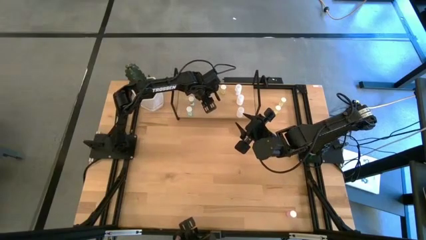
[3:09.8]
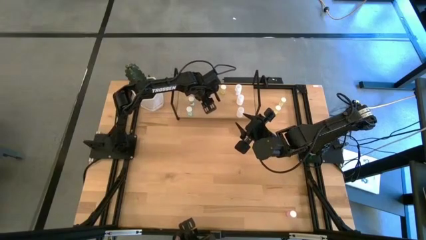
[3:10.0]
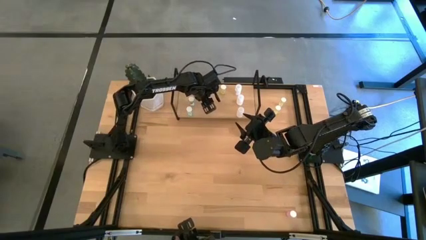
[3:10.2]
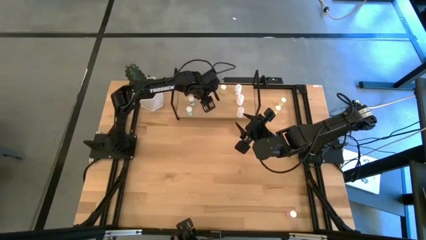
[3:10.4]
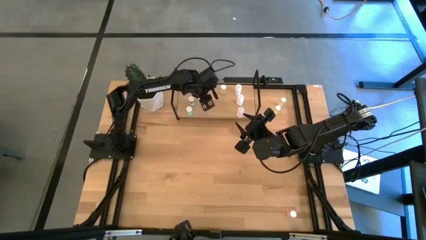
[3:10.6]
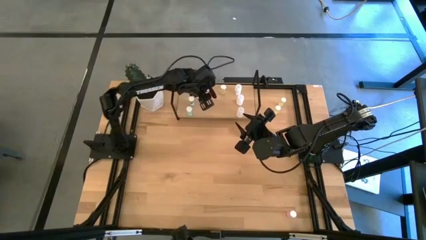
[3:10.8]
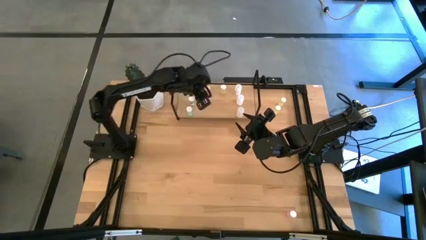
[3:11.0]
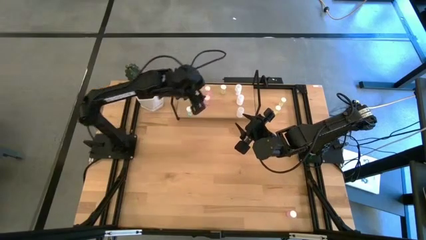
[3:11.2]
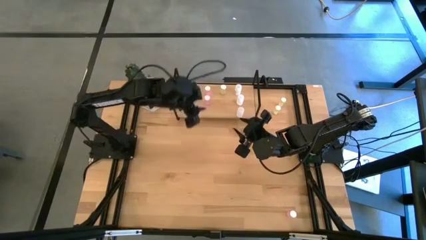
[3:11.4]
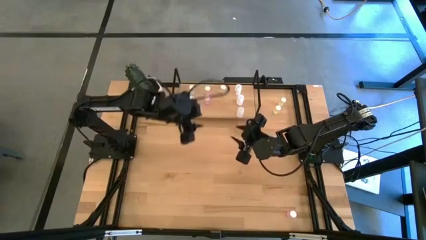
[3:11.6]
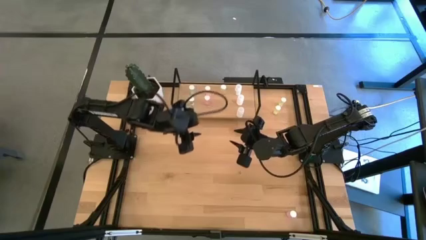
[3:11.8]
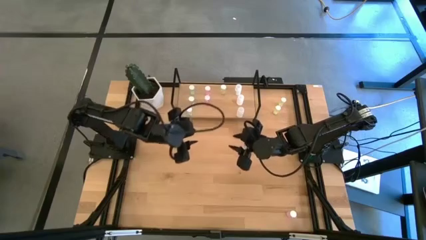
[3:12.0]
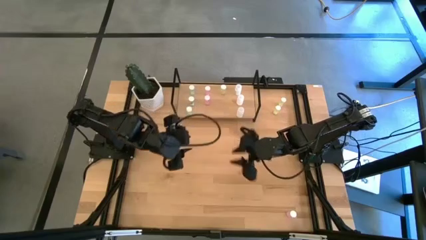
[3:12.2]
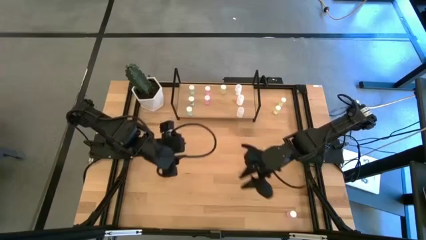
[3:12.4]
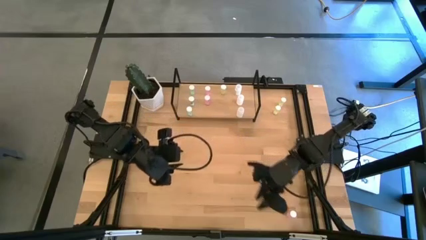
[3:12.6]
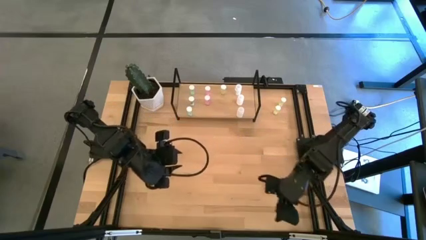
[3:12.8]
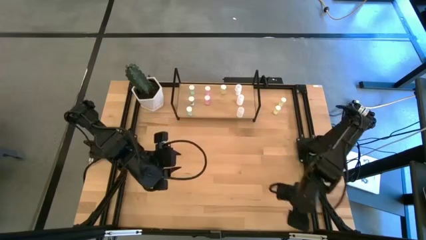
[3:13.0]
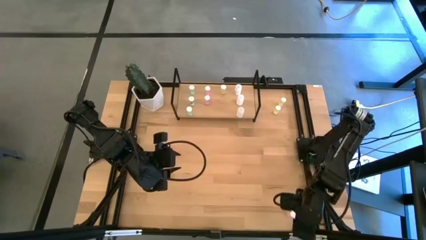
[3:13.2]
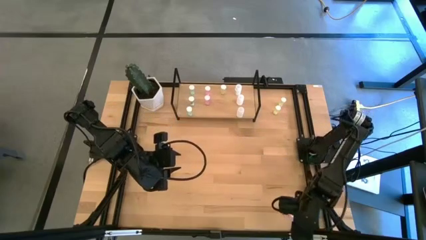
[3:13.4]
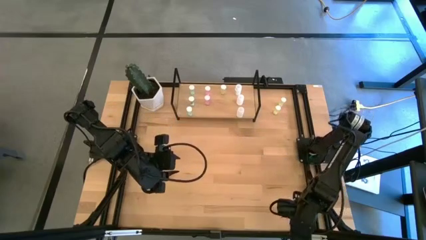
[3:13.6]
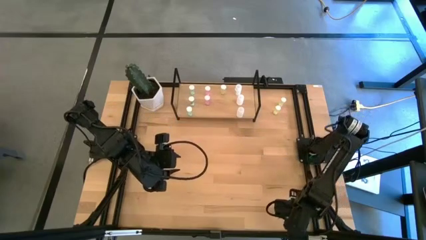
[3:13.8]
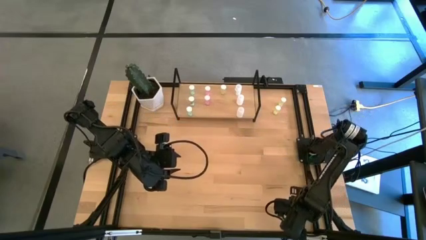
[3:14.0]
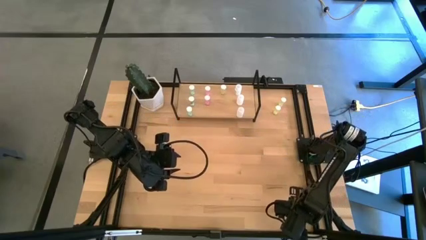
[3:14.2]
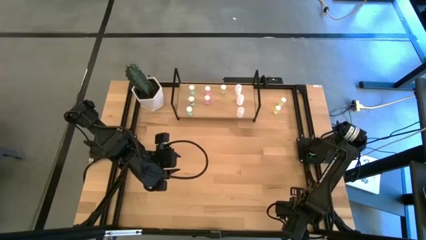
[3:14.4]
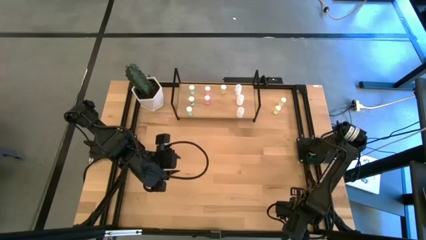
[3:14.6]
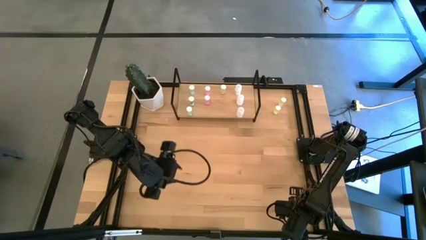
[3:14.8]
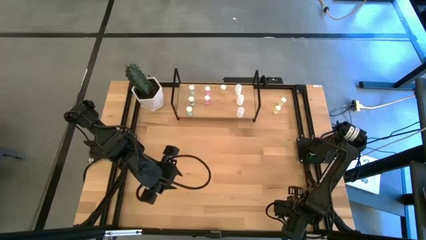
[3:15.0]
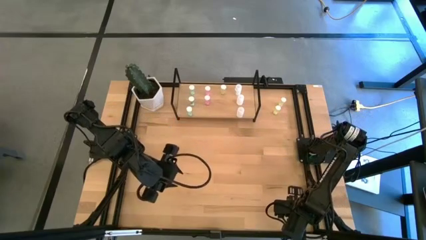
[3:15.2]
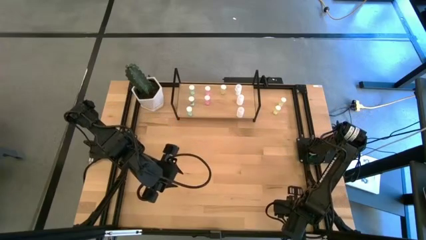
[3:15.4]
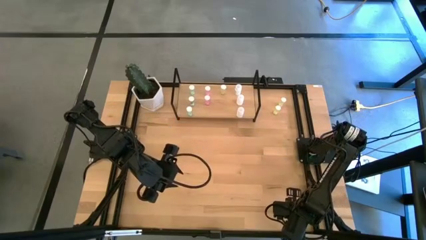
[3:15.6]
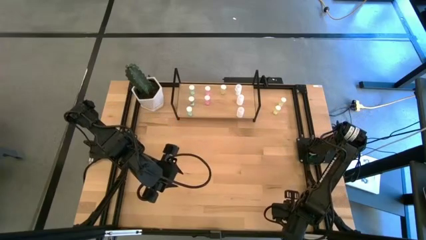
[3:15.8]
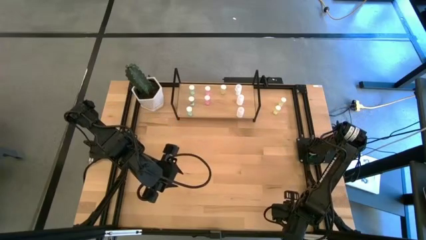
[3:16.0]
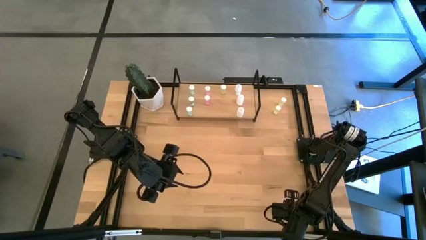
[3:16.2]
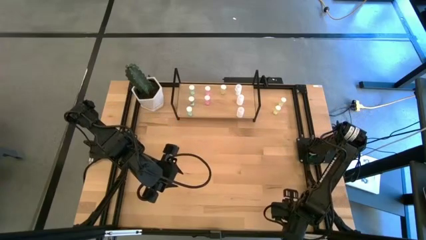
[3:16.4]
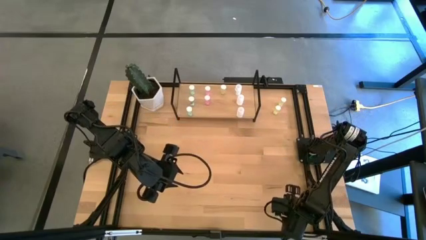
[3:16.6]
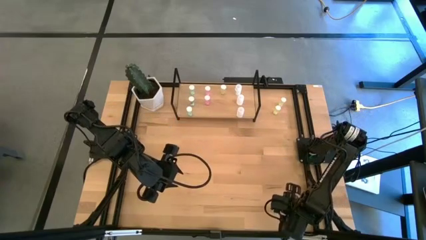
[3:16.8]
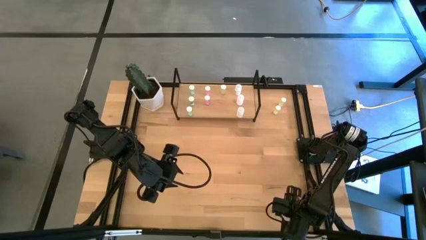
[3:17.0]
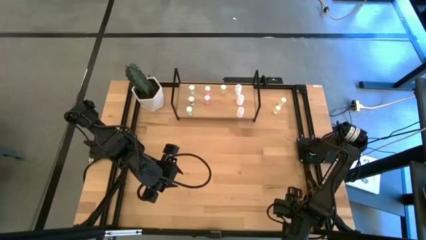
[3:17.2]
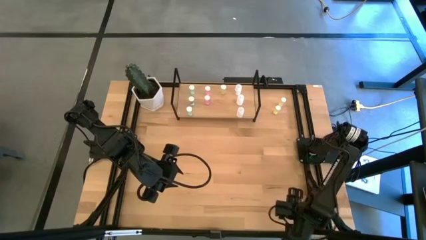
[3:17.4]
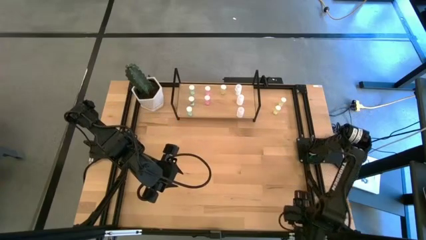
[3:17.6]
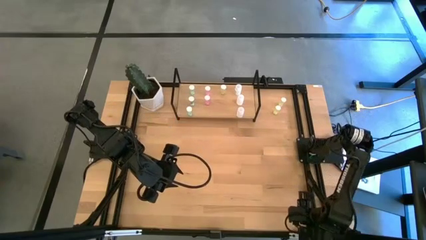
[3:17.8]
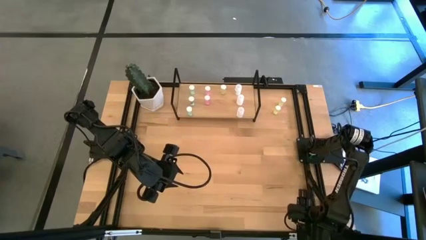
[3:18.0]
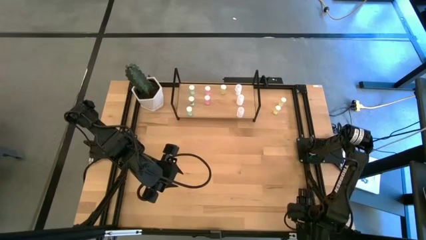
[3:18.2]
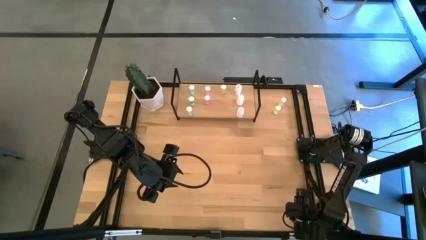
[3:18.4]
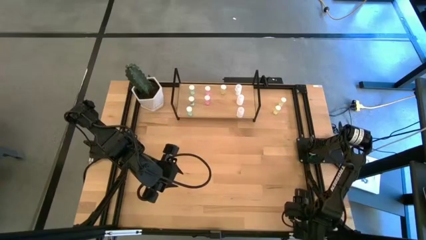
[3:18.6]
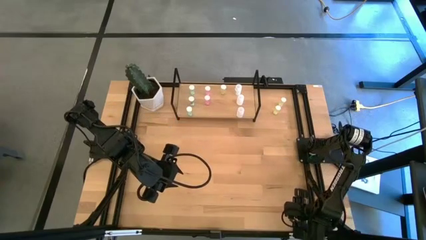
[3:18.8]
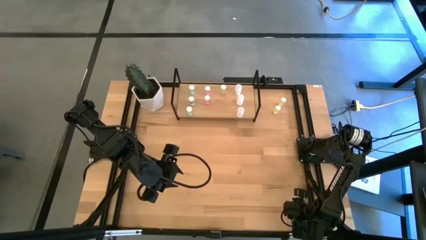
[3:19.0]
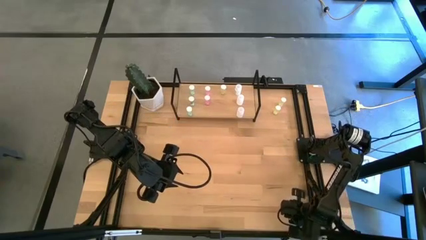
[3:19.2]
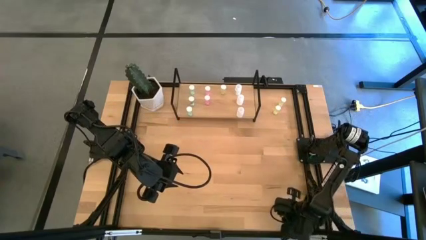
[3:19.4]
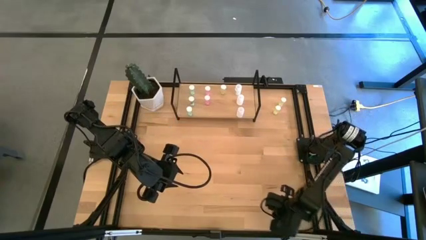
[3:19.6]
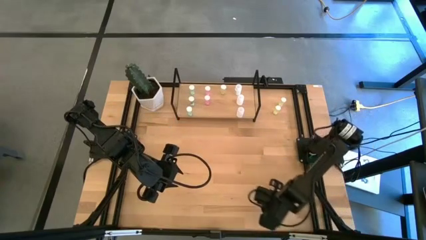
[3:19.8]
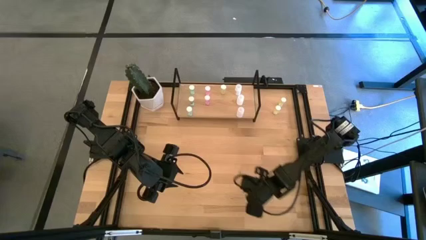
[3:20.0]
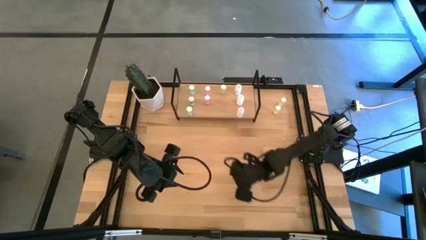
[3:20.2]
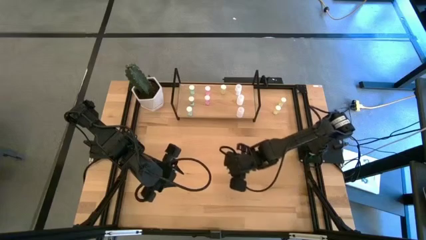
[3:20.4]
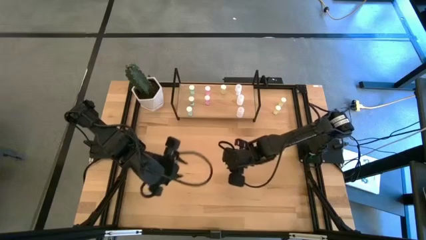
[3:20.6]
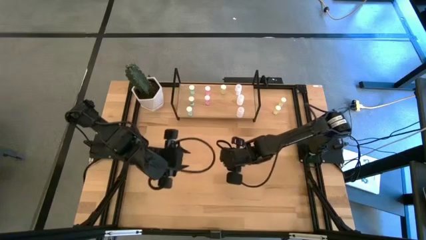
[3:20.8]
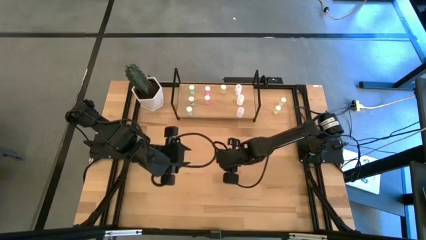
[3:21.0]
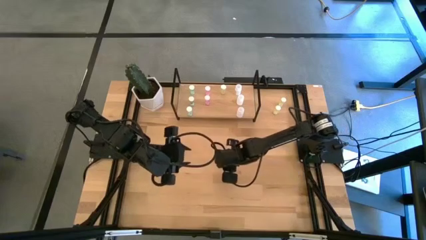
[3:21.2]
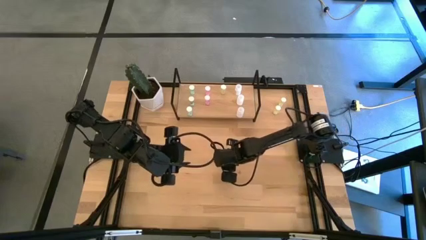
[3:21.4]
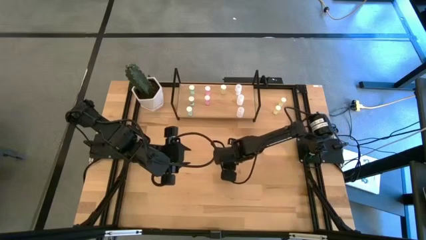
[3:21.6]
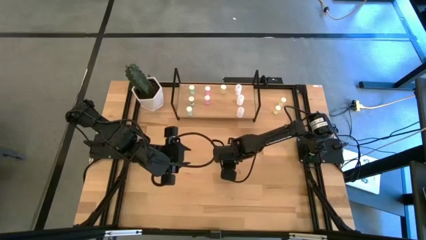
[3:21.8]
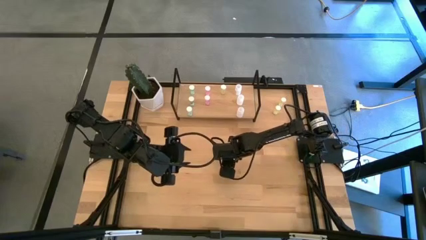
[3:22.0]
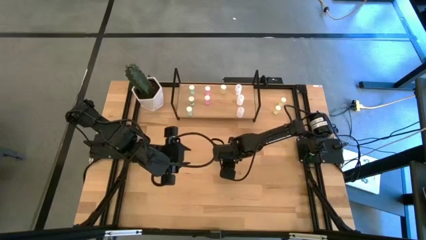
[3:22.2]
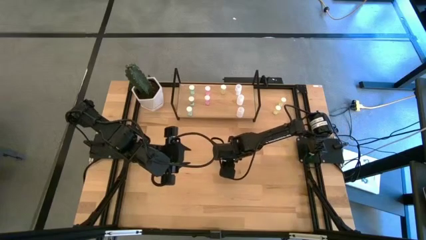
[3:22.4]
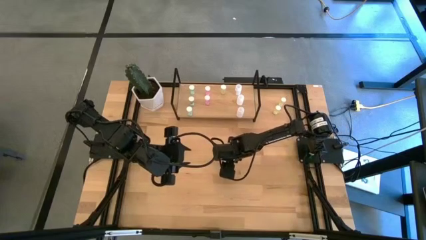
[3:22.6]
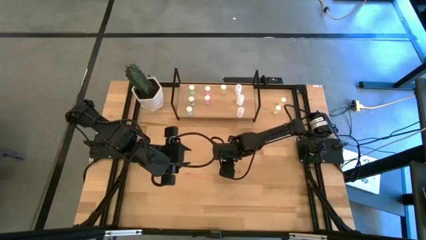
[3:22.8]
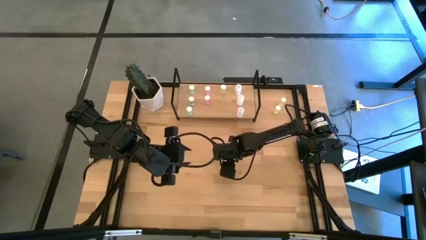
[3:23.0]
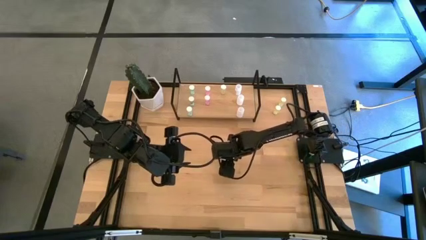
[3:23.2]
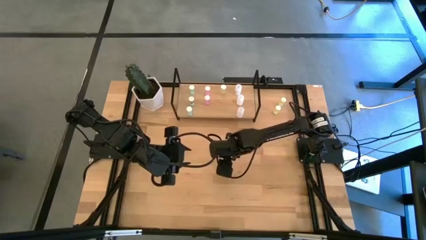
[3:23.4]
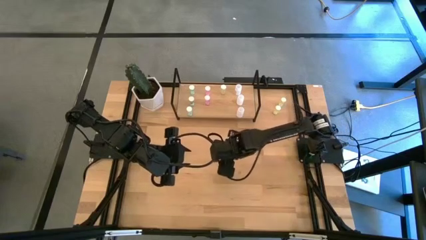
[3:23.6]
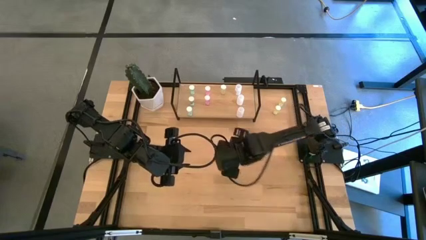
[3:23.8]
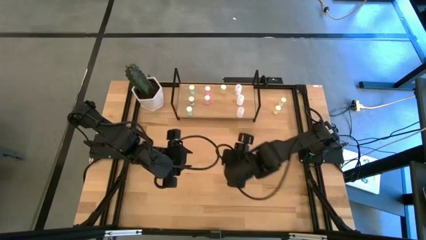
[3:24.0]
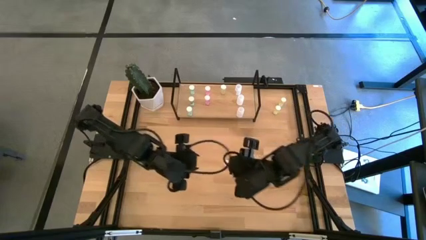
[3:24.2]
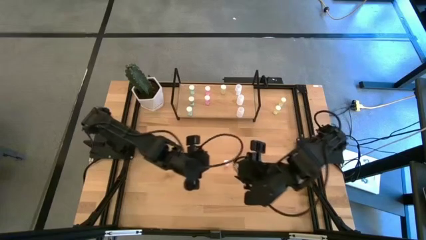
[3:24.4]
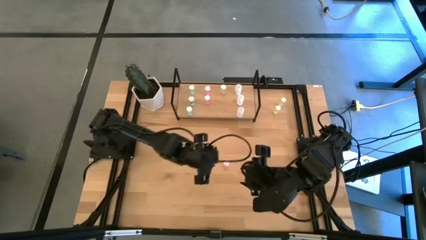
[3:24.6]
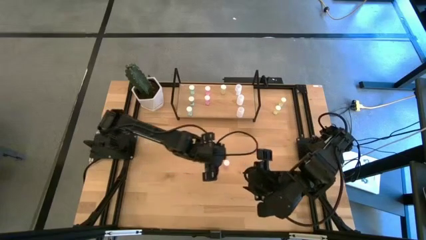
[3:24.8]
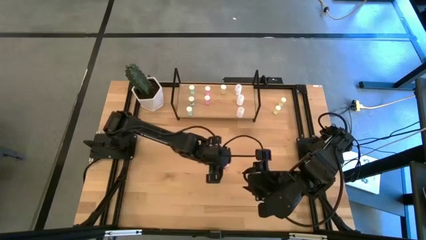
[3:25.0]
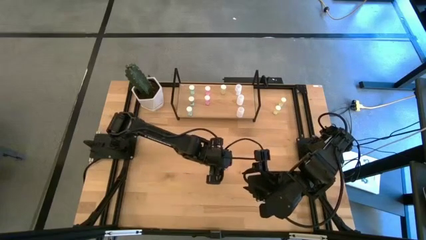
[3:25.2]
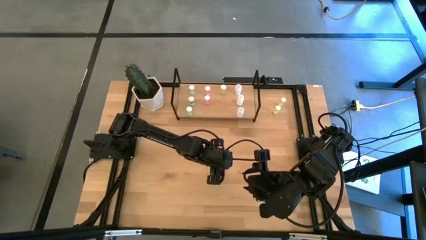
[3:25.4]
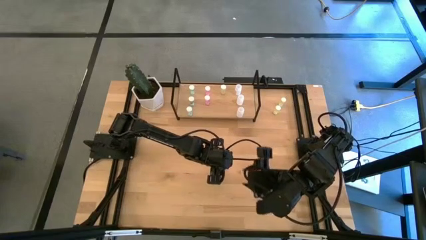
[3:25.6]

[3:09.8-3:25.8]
Task: Pick and place medicine bottles onto shelf by color
Put the pink pill bottle on the shelf aligned with the other pink pill bottle
